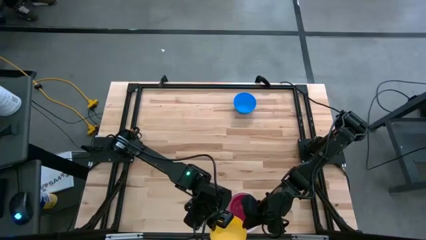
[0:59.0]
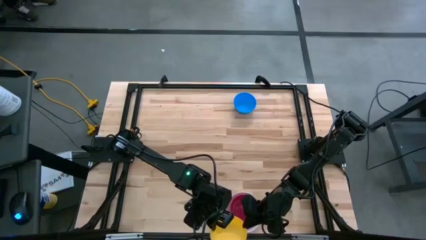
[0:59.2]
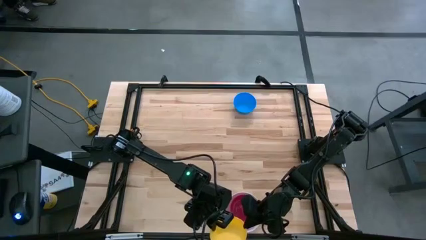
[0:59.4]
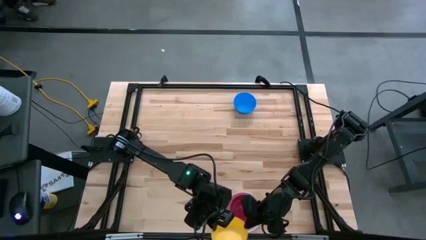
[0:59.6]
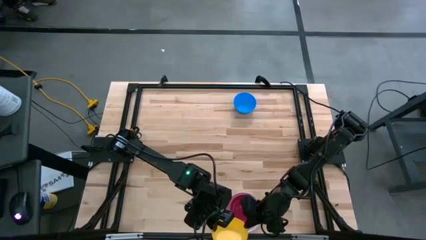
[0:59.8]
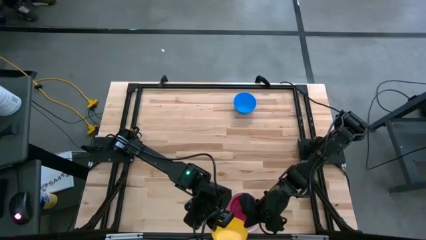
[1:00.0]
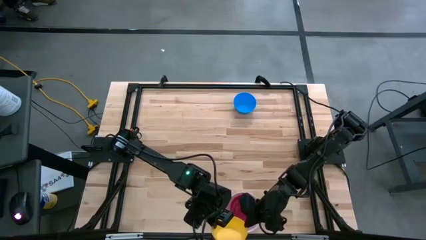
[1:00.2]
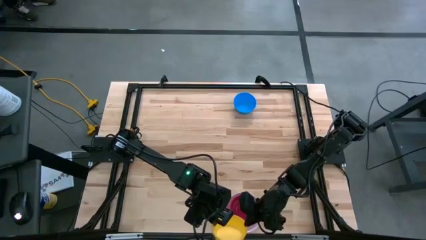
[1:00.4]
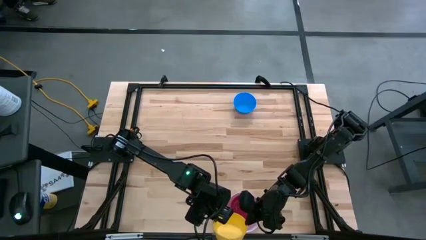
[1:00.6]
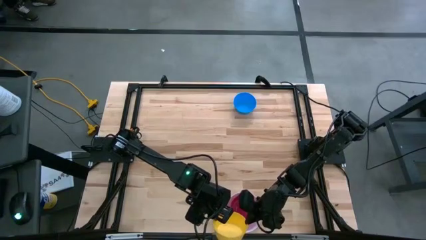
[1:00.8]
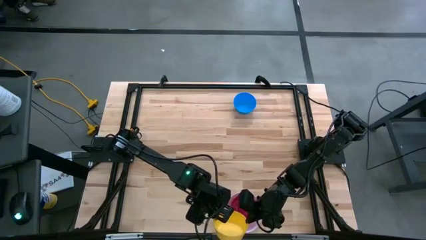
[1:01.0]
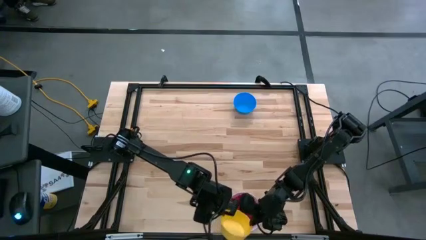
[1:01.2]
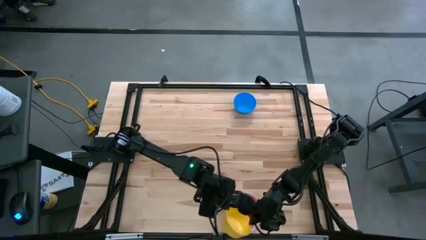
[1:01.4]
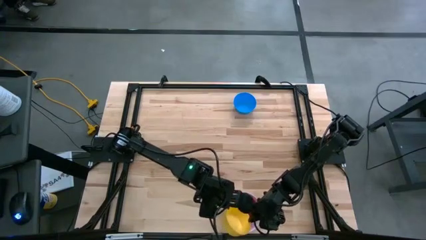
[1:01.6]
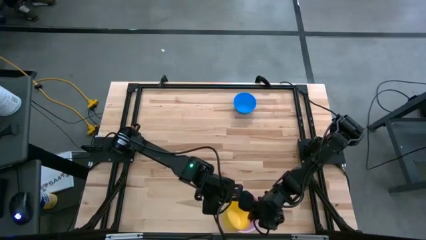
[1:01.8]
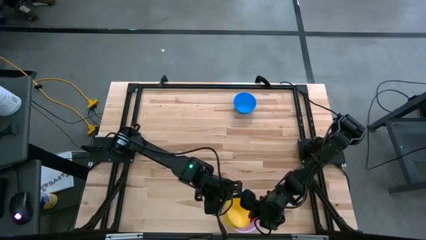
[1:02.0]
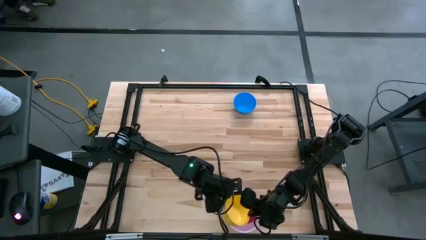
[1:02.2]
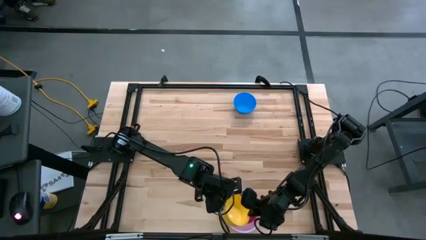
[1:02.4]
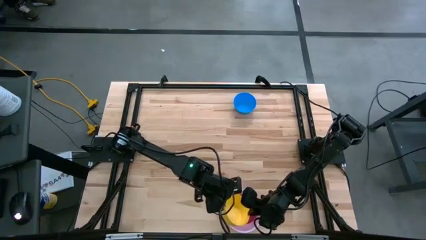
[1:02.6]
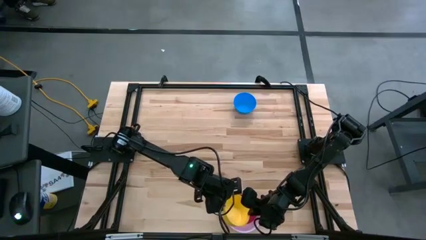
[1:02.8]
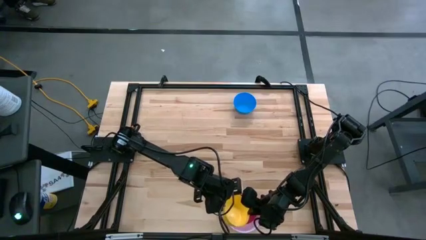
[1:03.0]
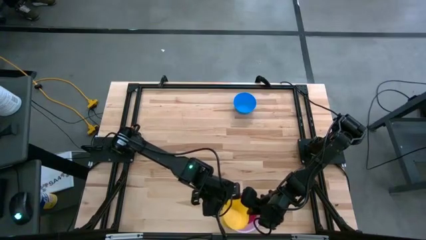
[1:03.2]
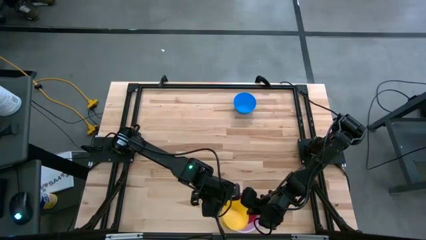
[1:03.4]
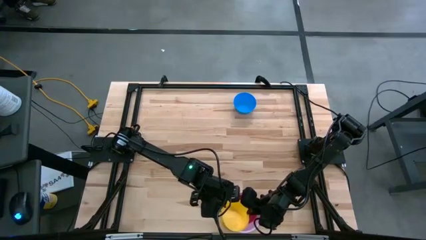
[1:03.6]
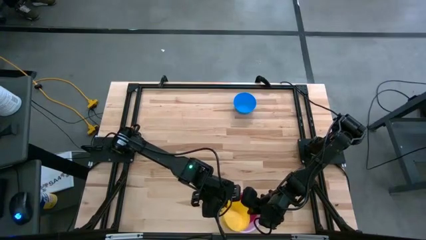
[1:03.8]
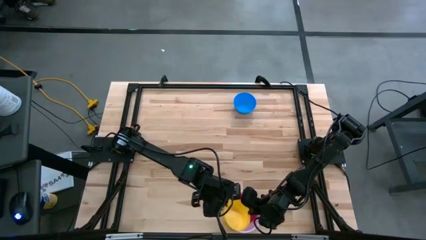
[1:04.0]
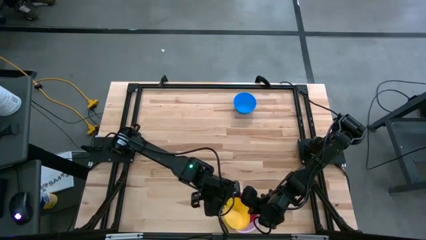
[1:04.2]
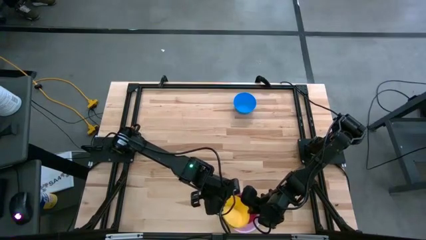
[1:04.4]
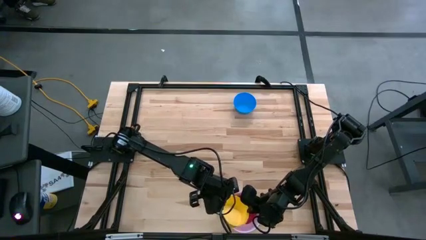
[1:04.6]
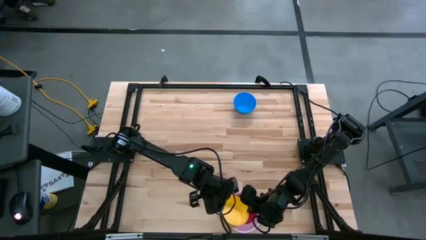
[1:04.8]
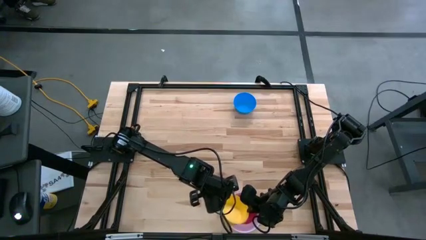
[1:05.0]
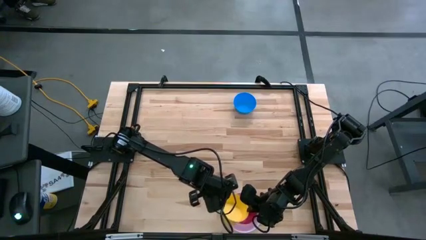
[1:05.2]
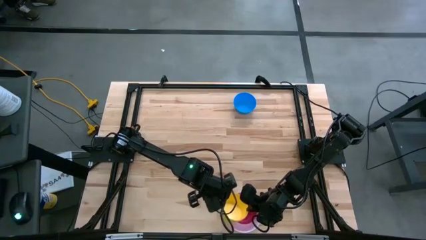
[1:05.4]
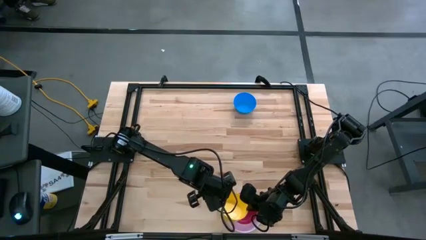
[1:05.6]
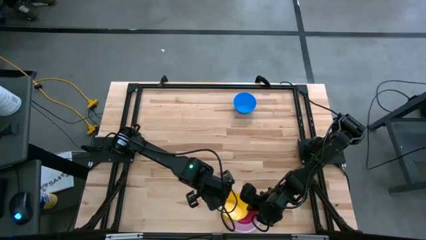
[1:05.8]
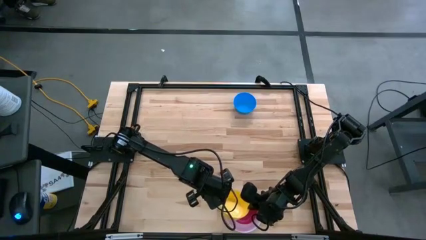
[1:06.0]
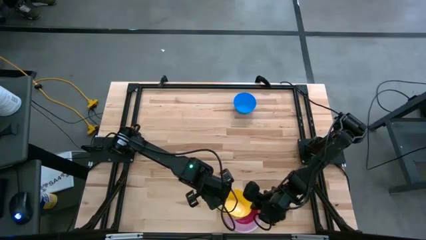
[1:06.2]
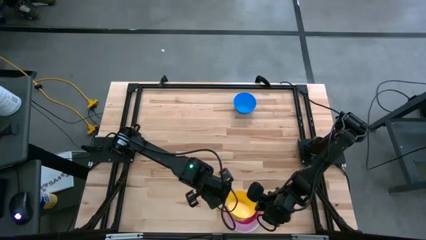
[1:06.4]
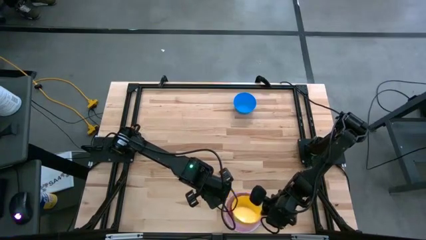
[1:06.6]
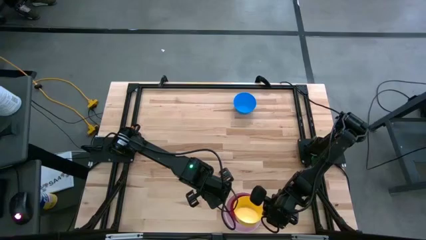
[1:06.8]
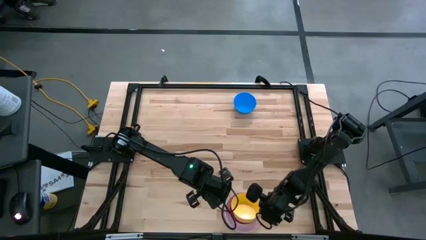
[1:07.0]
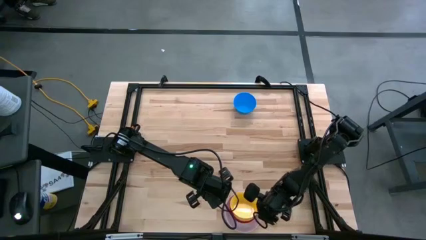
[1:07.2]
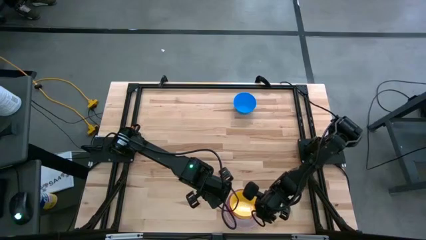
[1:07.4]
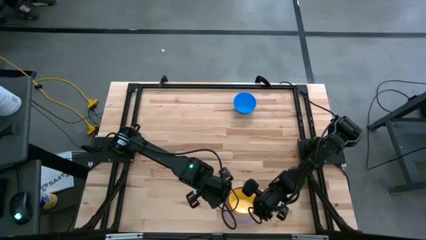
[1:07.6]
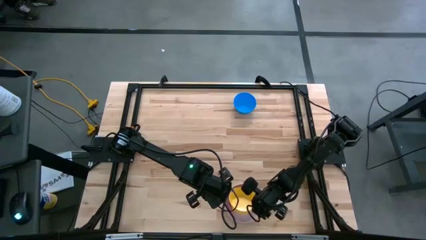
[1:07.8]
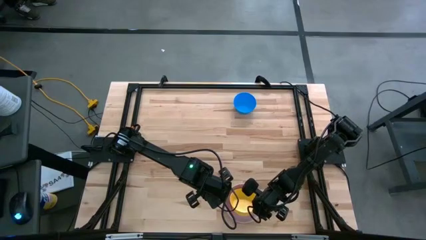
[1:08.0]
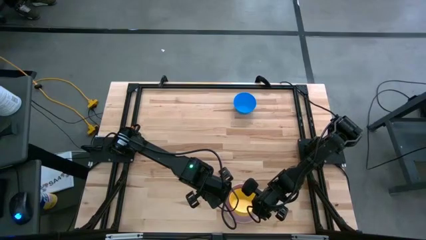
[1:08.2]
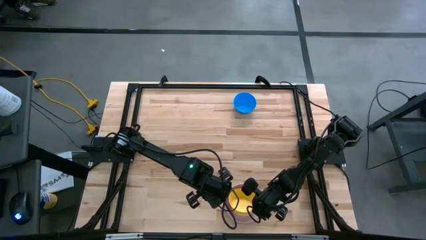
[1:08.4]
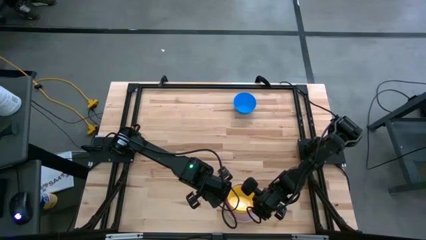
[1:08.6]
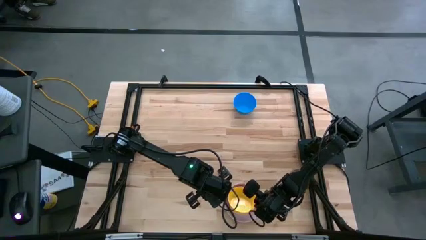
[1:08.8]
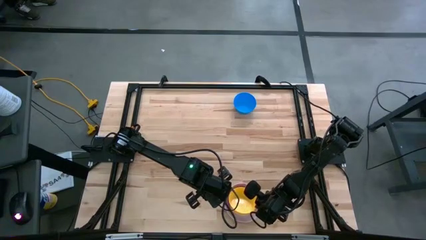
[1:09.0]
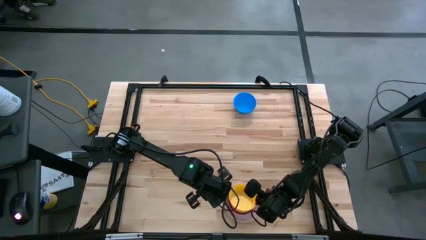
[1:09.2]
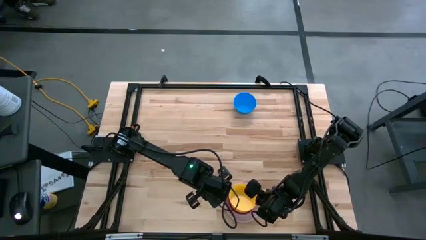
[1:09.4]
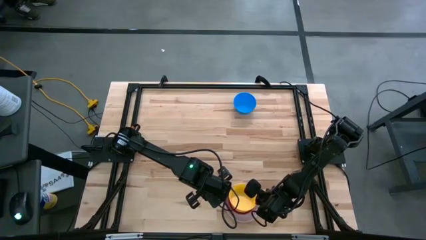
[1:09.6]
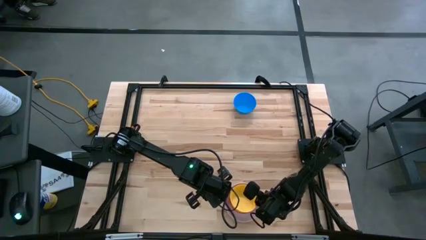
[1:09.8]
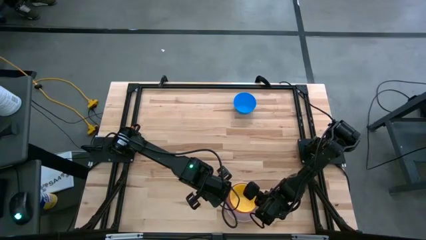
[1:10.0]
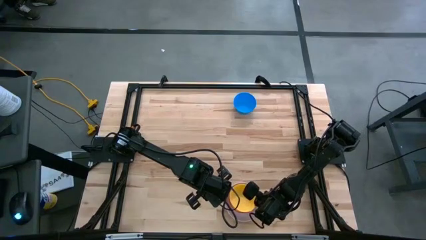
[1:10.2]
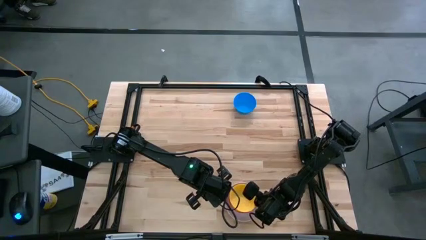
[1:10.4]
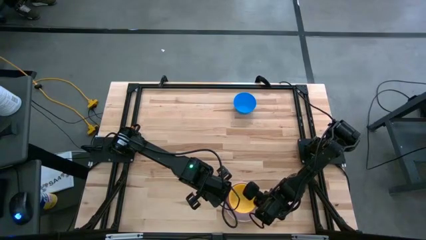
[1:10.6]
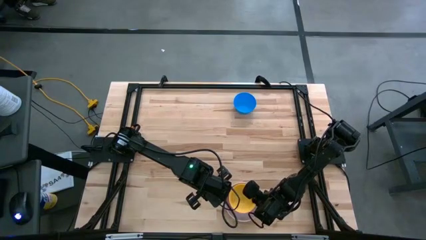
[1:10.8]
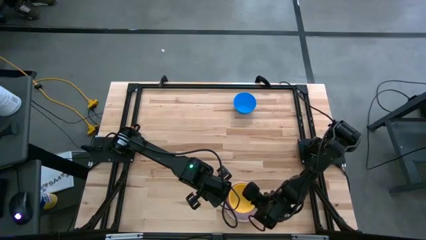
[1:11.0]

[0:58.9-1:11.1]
Stack the yellow bowl on the red bowl
